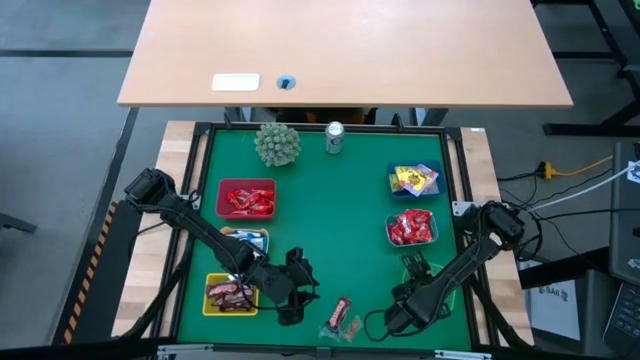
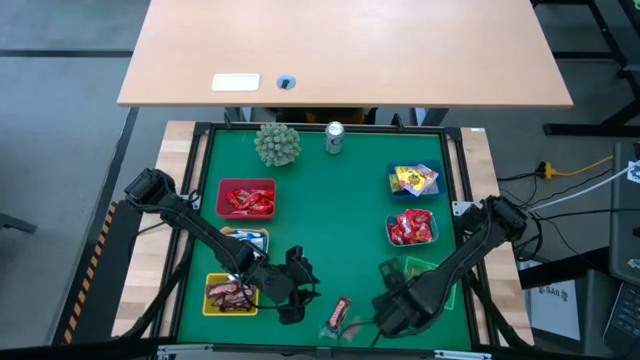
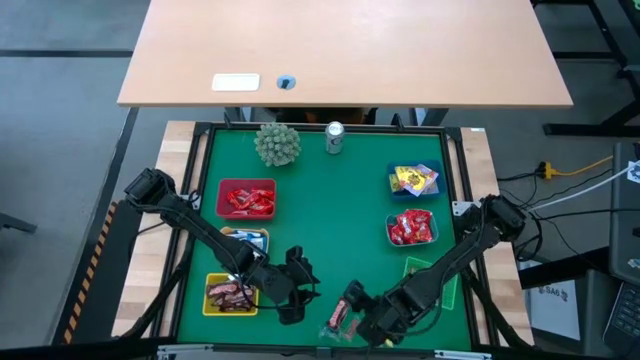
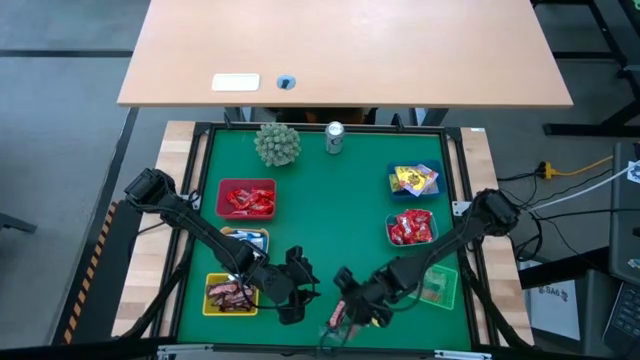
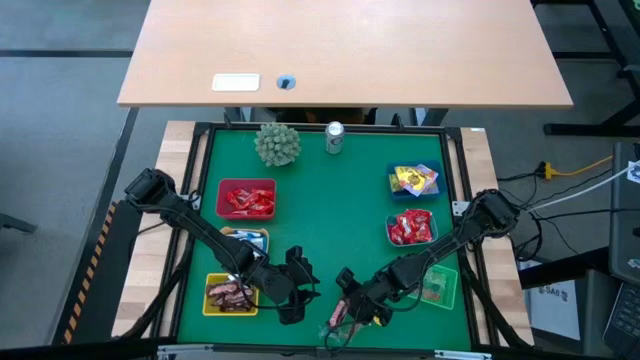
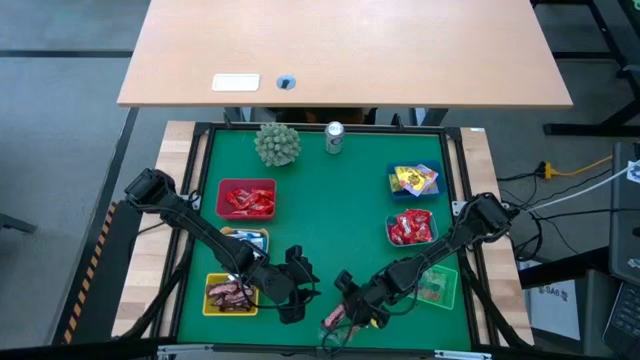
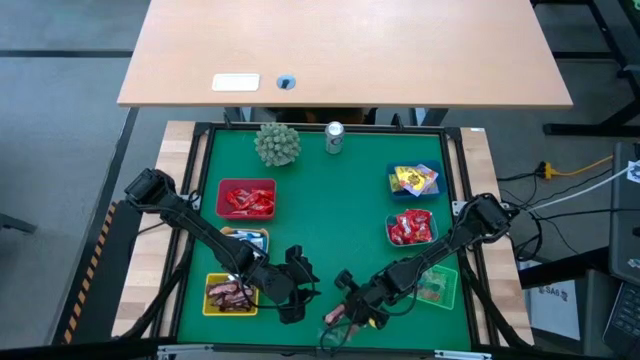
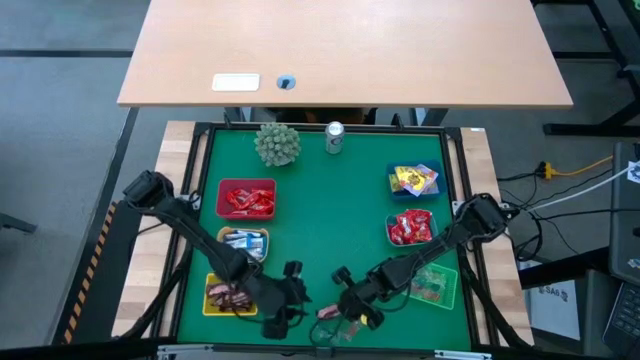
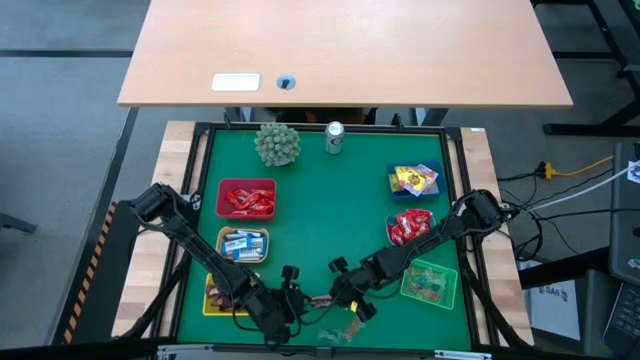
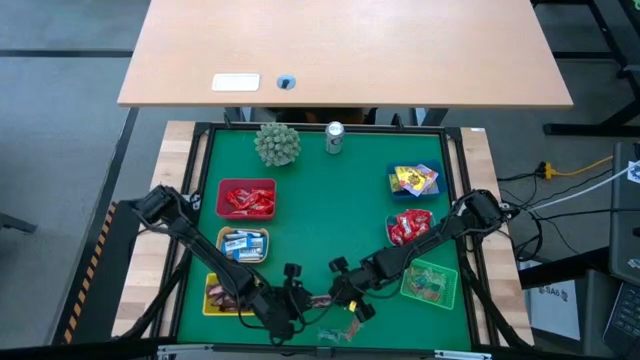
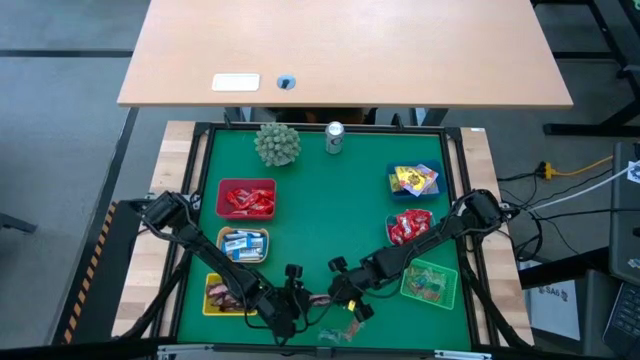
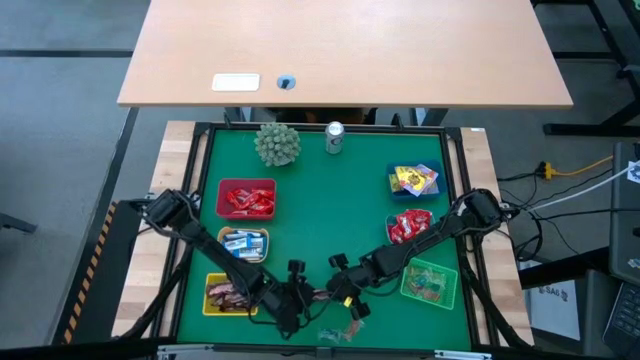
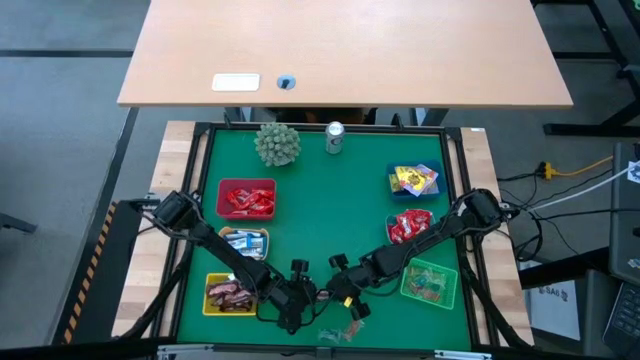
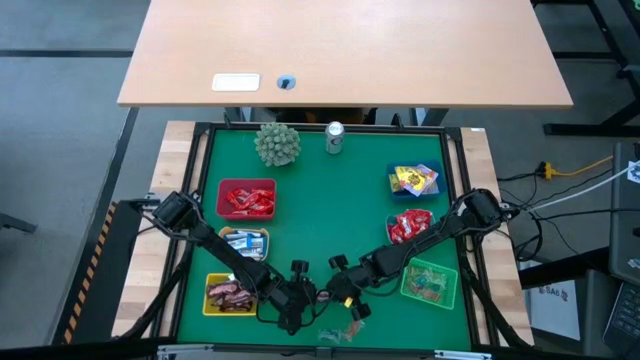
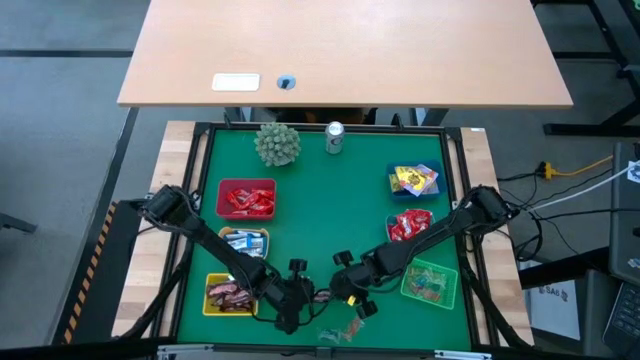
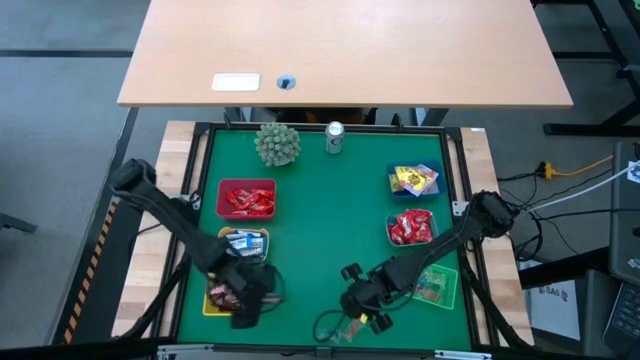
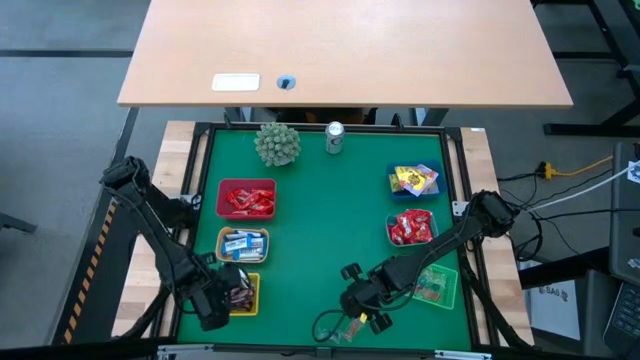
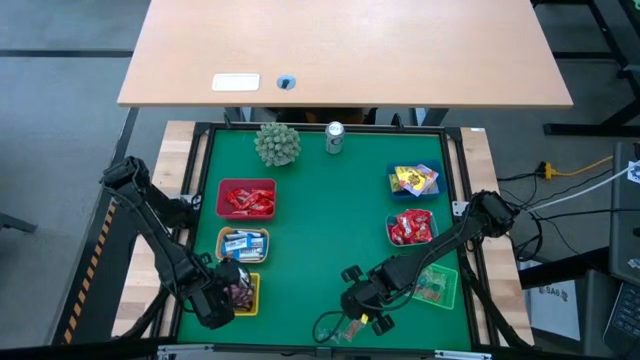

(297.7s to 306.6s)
Task: Sort candy
Put the brown chocolate bar into the yellow bin

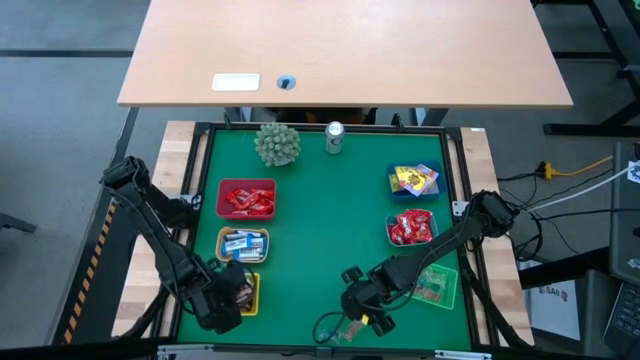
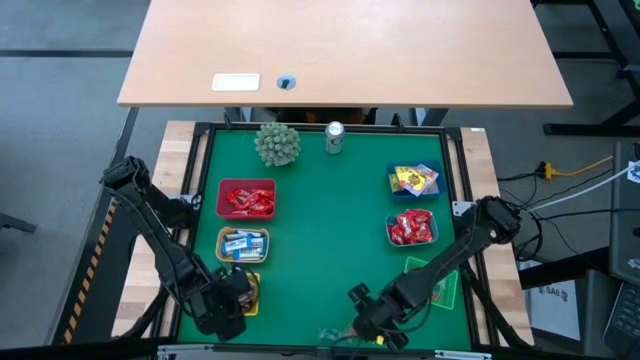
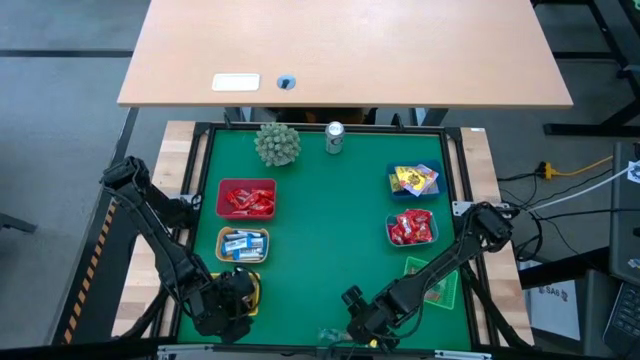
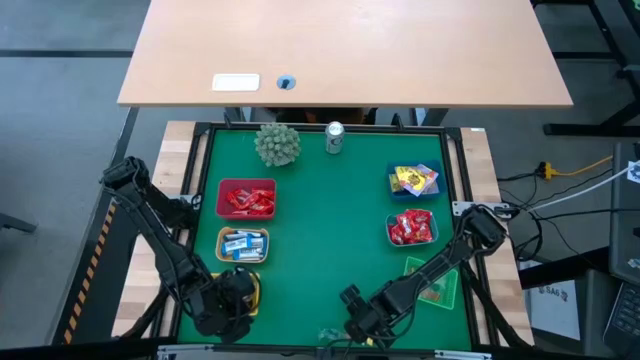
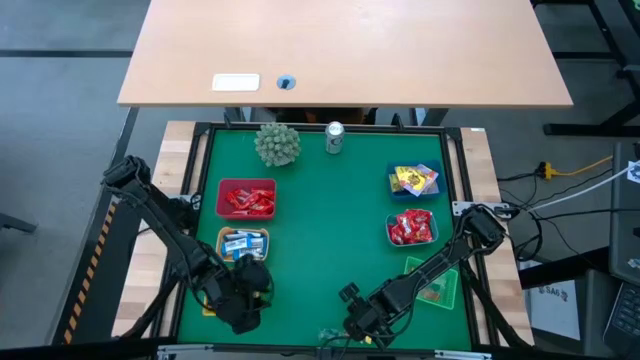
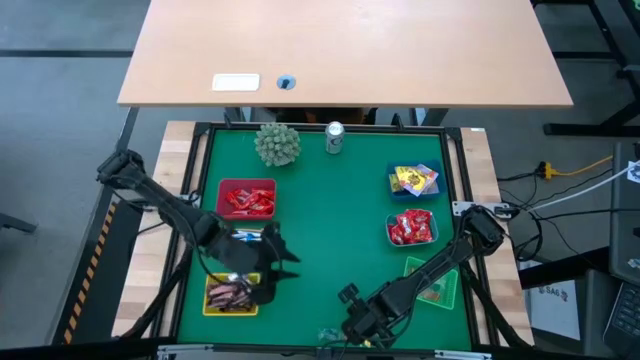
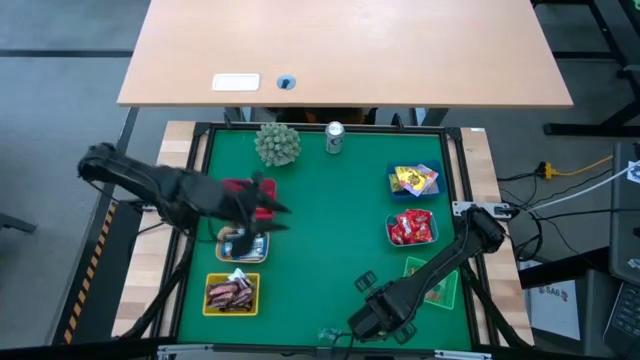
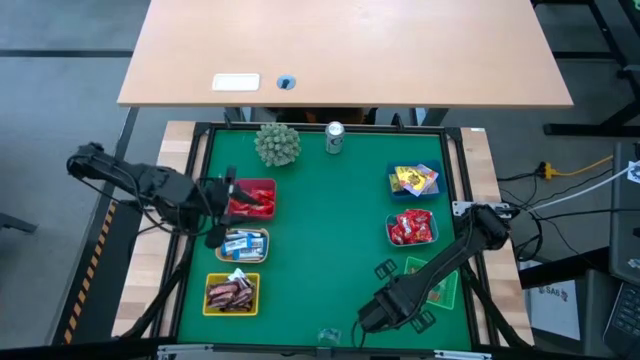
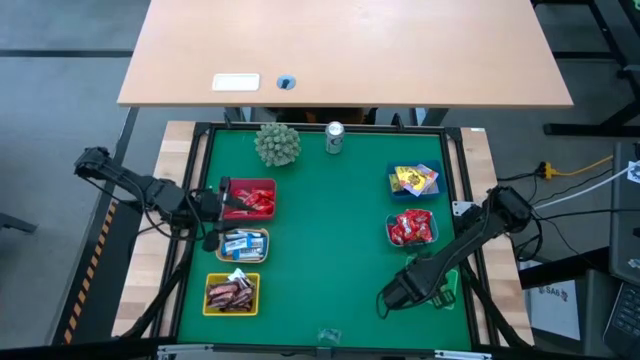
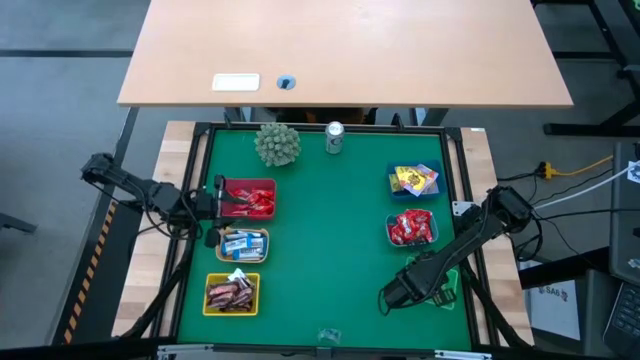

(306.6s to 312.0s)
Put the orange gummy into the green bin

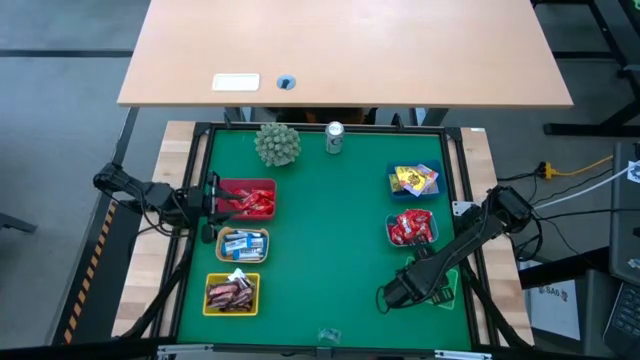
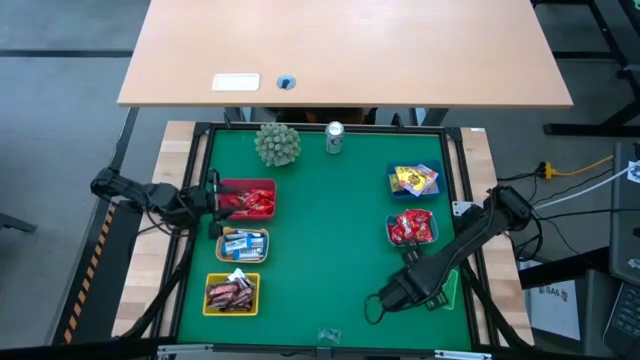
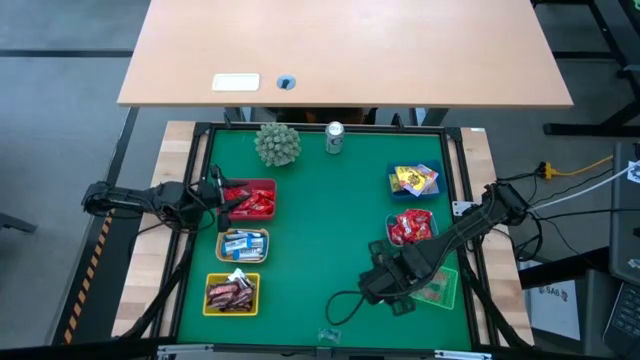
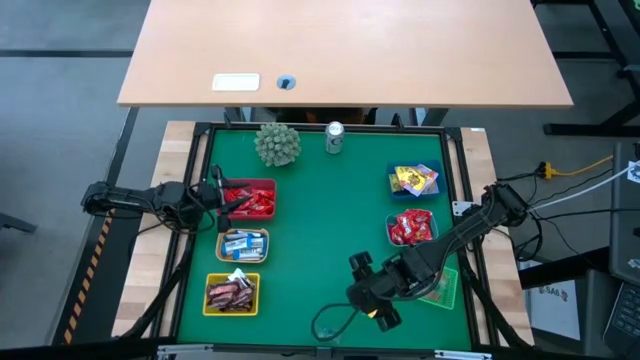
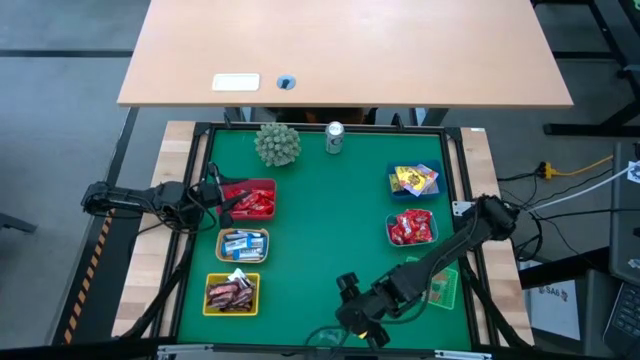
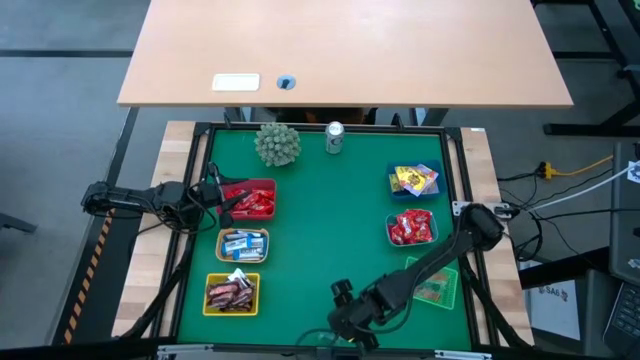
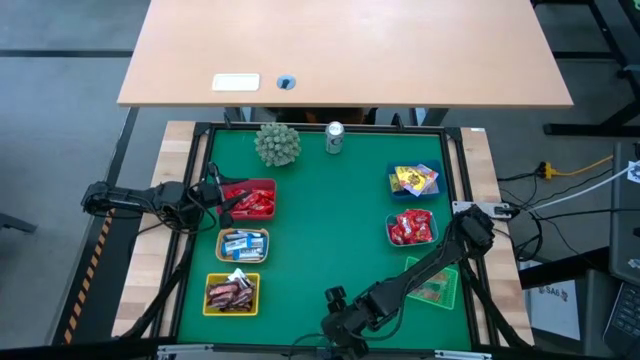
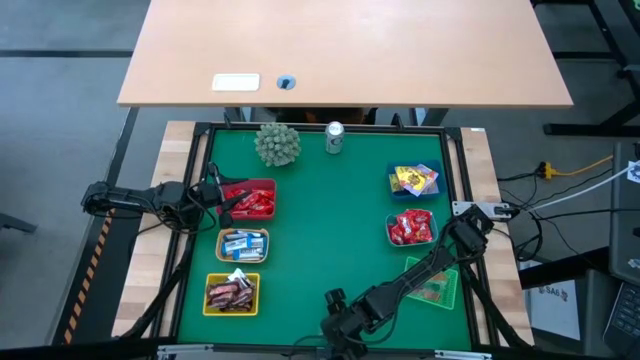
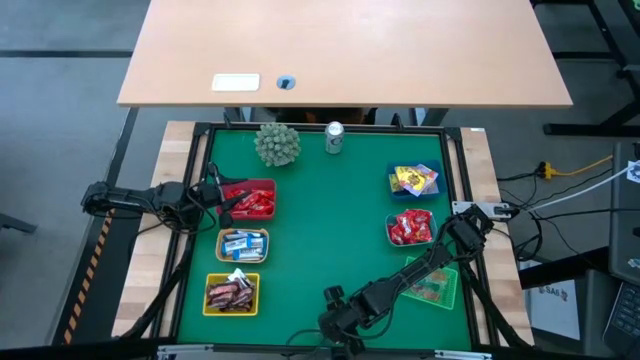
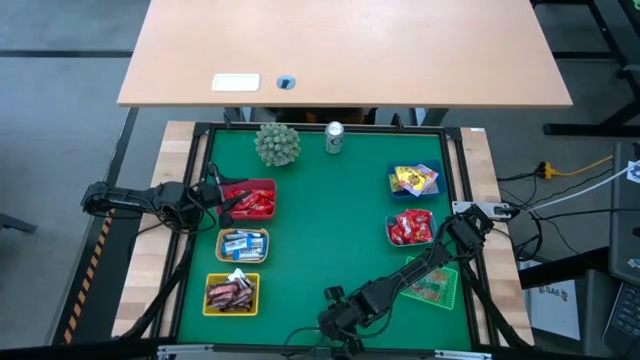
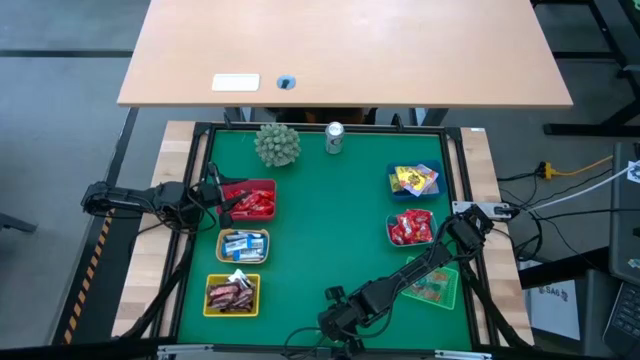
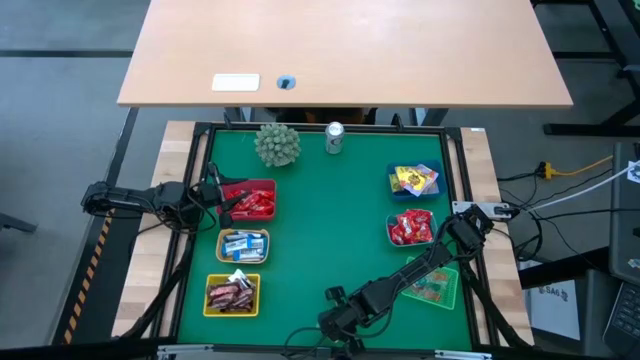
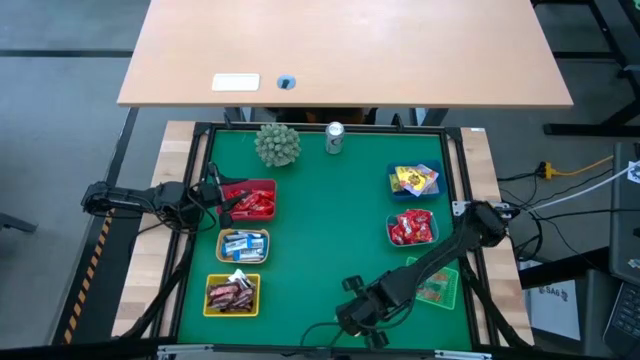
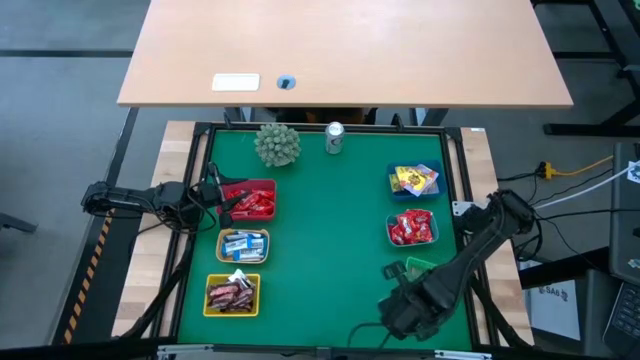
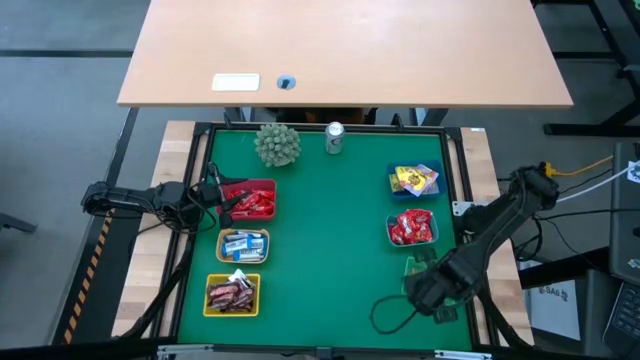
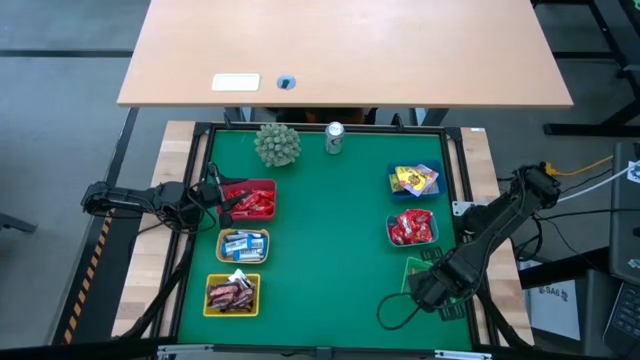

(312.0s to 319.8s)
Put the blue gummy into the green bin
